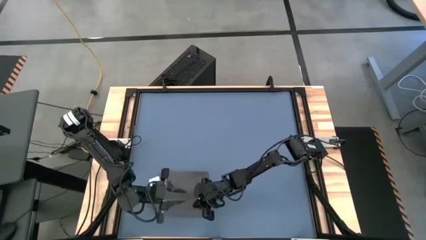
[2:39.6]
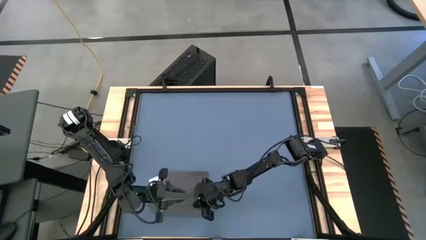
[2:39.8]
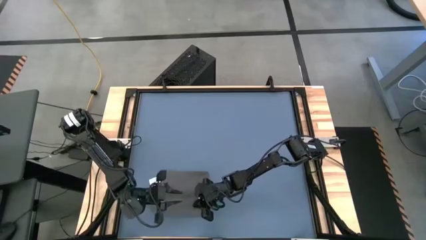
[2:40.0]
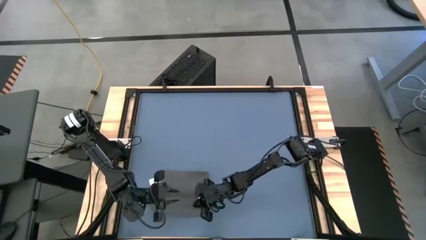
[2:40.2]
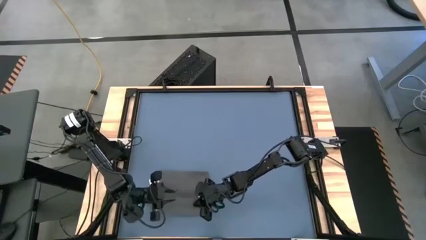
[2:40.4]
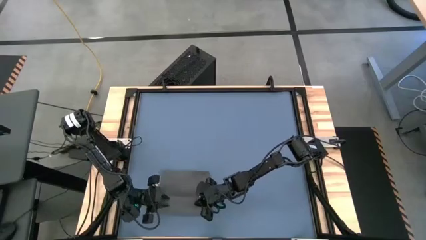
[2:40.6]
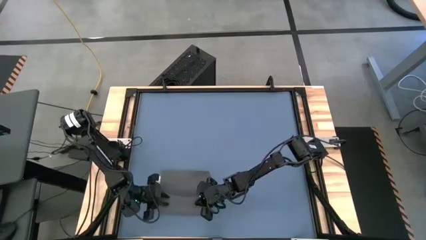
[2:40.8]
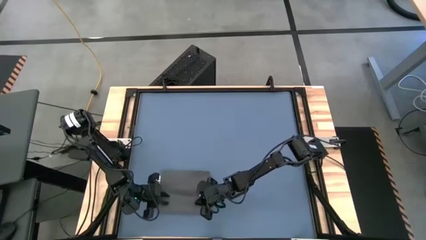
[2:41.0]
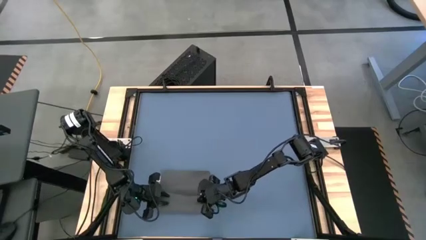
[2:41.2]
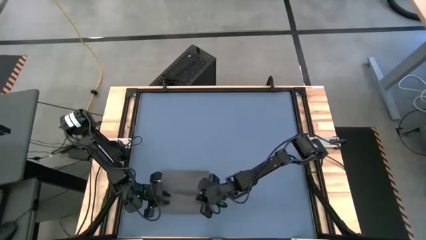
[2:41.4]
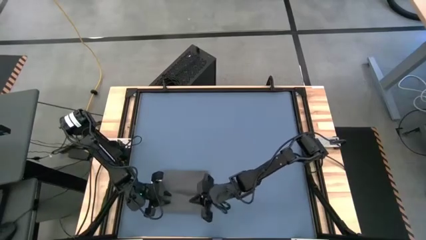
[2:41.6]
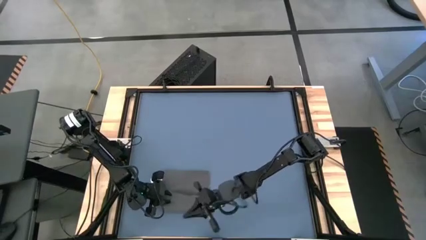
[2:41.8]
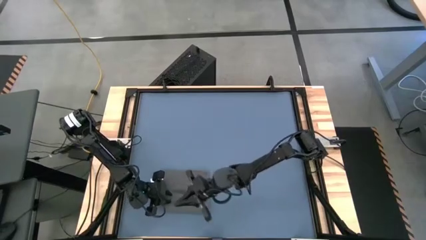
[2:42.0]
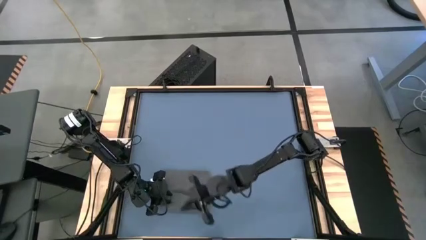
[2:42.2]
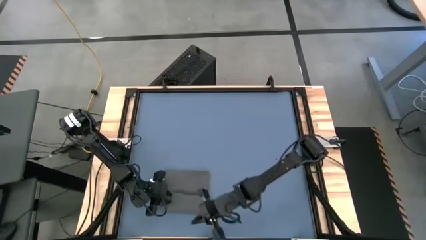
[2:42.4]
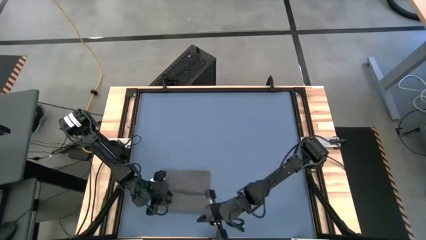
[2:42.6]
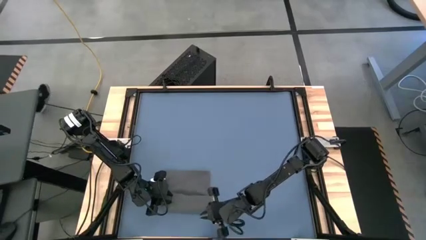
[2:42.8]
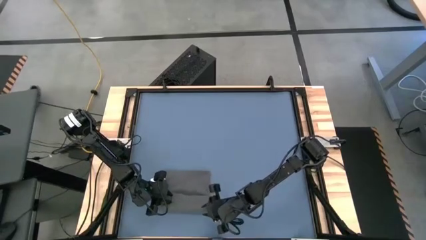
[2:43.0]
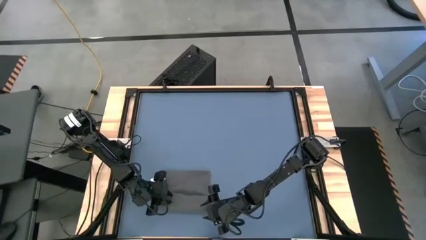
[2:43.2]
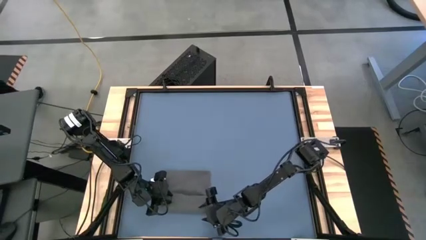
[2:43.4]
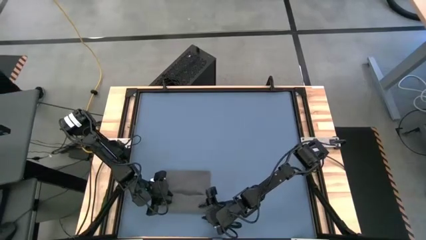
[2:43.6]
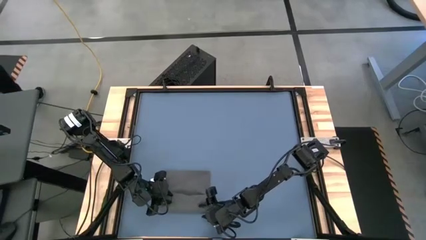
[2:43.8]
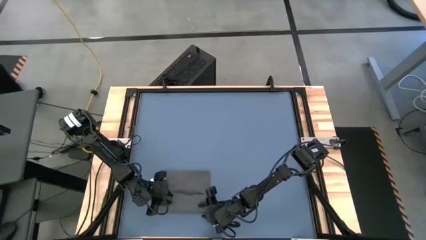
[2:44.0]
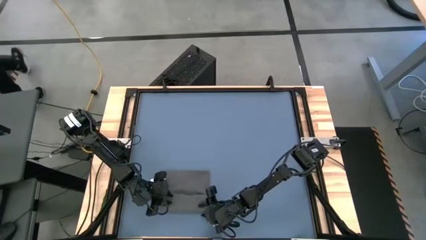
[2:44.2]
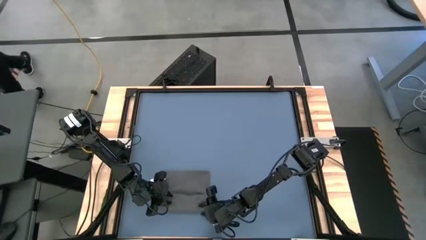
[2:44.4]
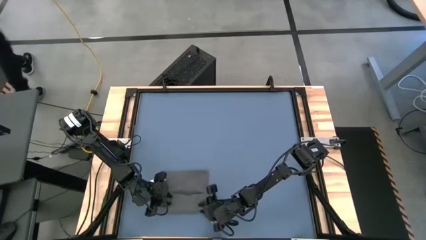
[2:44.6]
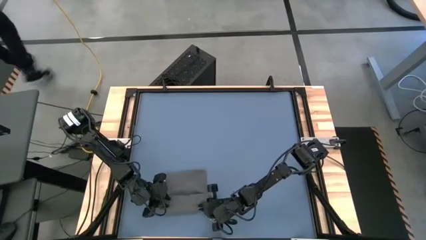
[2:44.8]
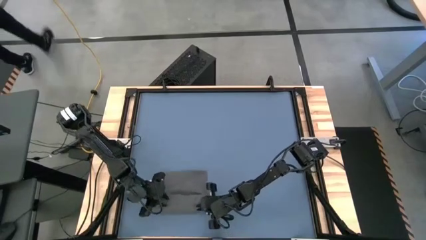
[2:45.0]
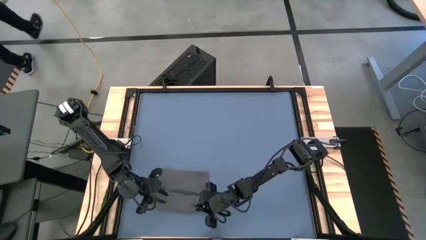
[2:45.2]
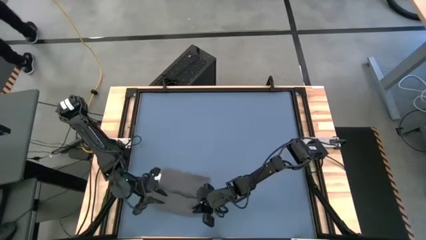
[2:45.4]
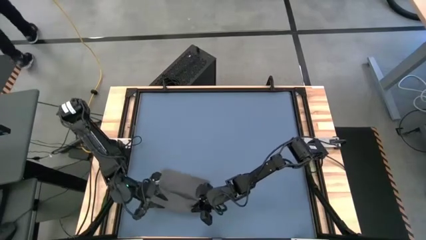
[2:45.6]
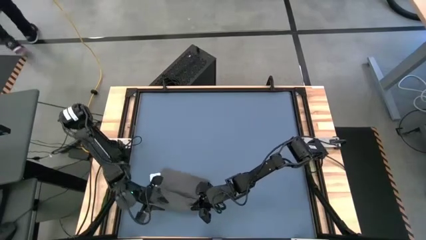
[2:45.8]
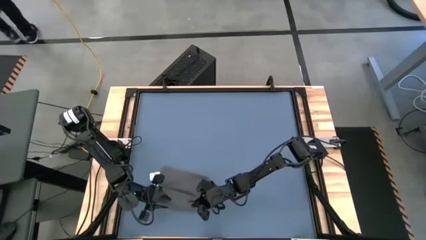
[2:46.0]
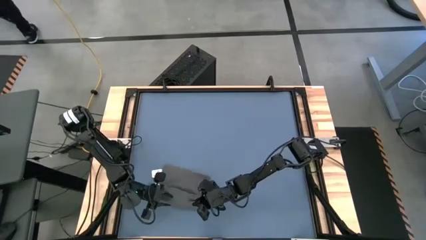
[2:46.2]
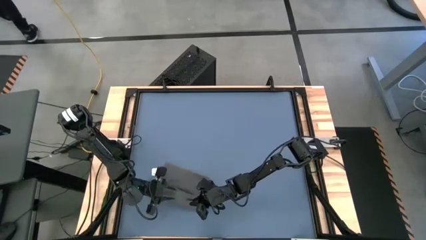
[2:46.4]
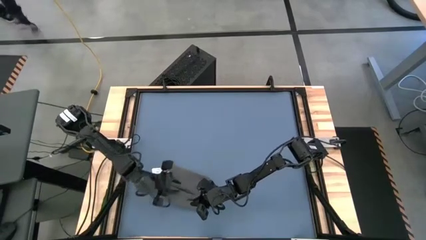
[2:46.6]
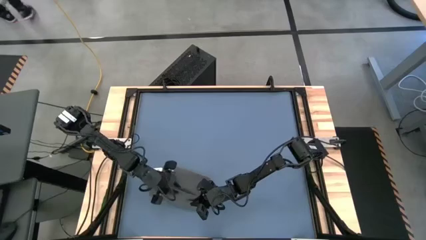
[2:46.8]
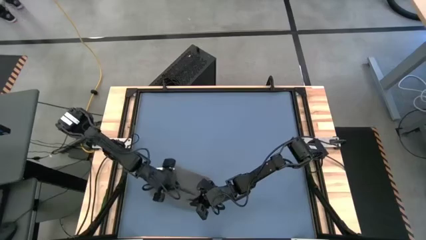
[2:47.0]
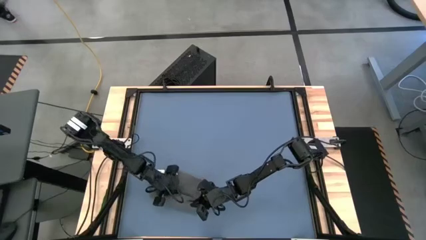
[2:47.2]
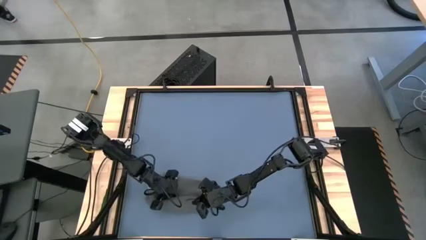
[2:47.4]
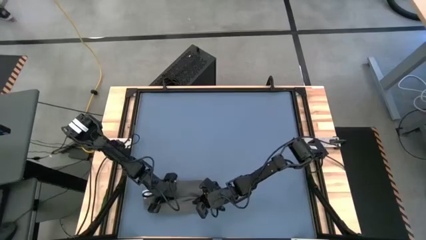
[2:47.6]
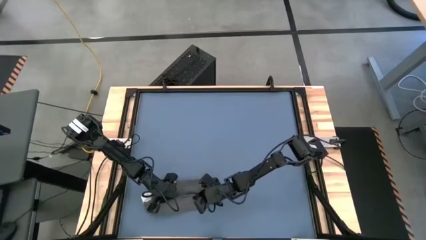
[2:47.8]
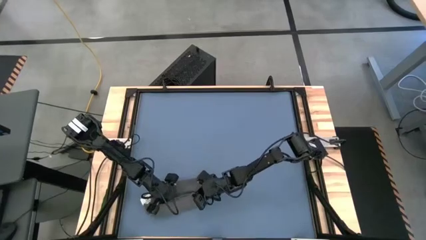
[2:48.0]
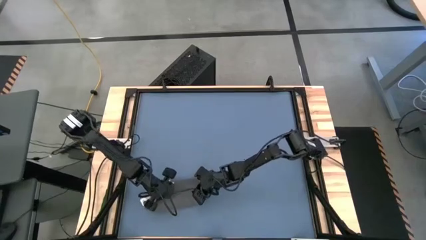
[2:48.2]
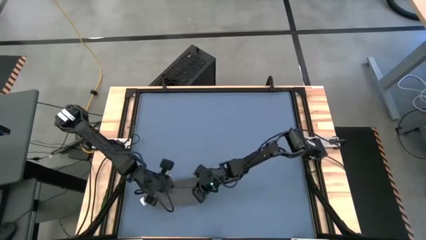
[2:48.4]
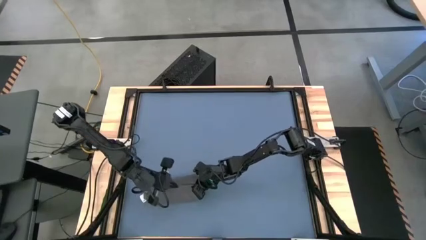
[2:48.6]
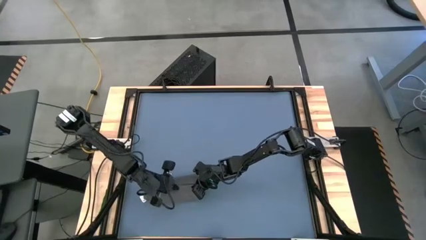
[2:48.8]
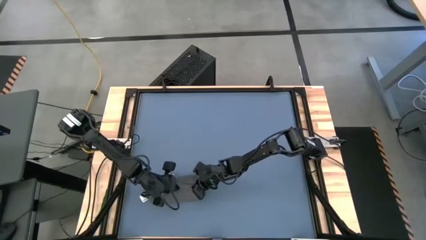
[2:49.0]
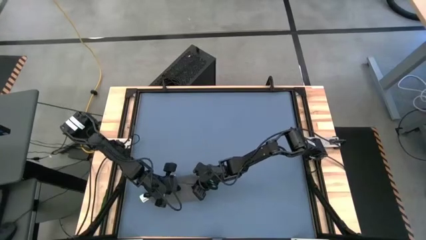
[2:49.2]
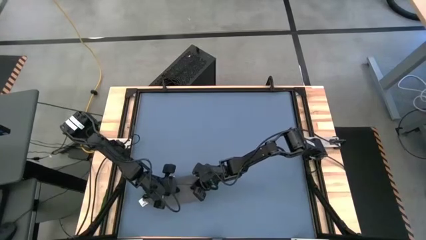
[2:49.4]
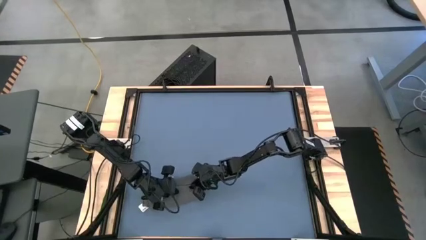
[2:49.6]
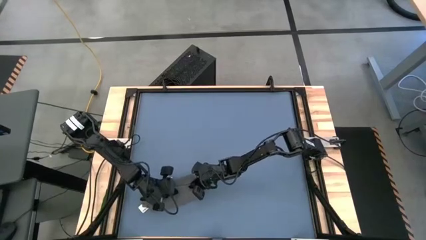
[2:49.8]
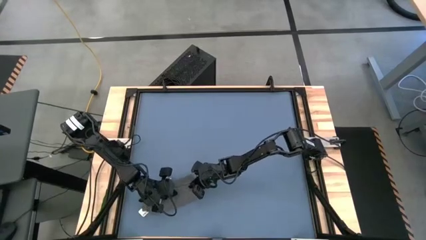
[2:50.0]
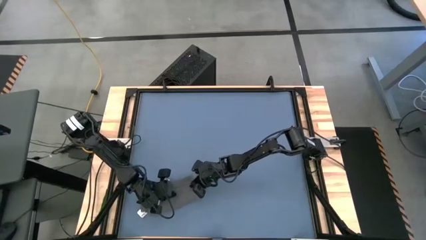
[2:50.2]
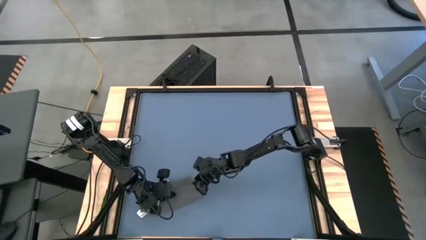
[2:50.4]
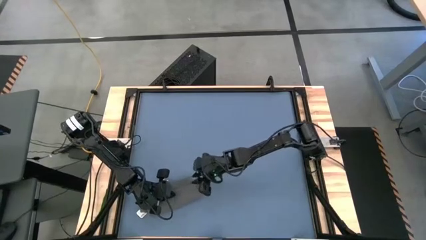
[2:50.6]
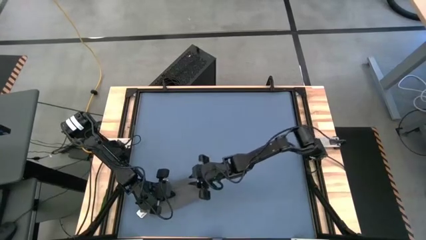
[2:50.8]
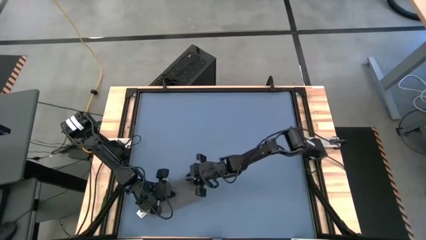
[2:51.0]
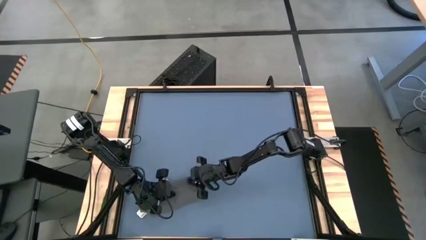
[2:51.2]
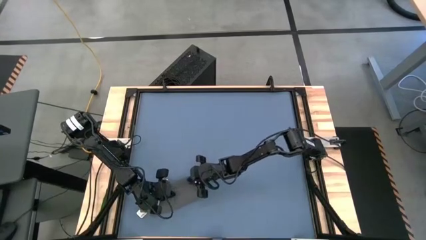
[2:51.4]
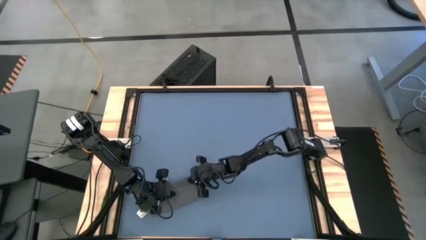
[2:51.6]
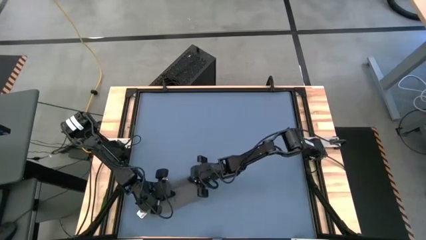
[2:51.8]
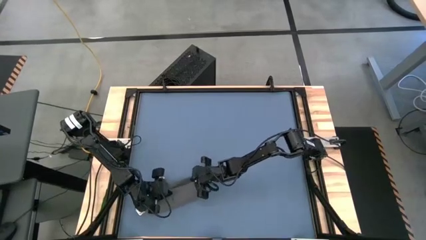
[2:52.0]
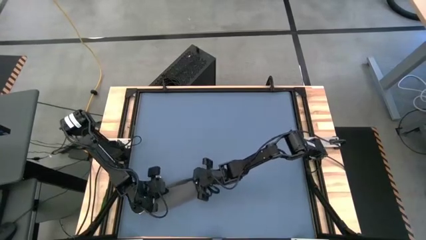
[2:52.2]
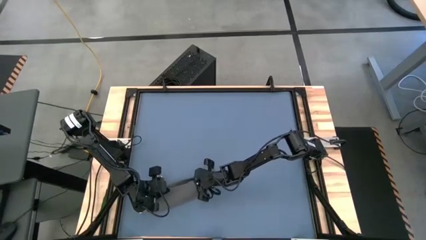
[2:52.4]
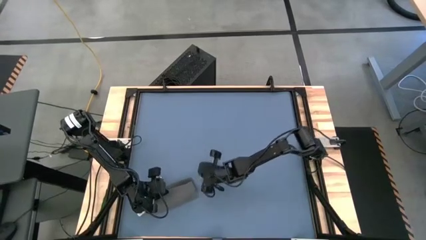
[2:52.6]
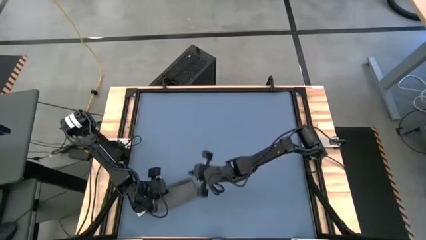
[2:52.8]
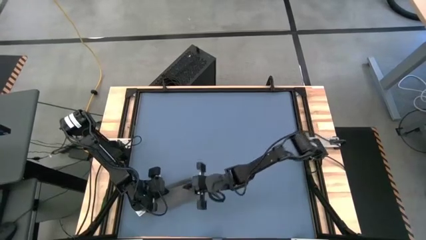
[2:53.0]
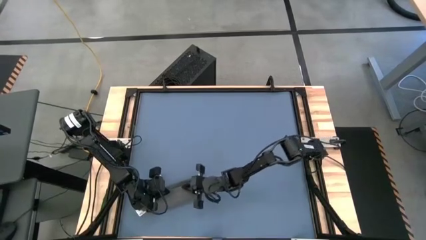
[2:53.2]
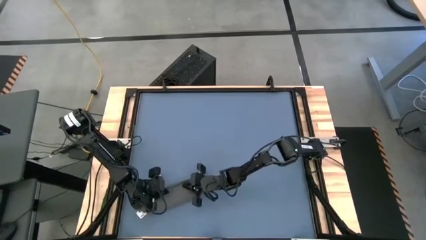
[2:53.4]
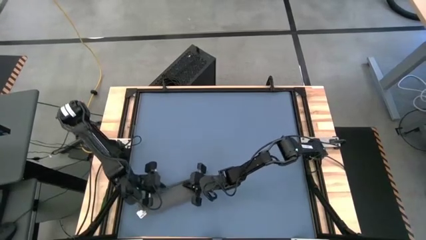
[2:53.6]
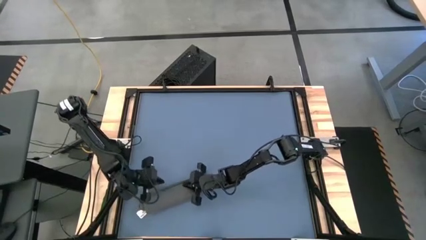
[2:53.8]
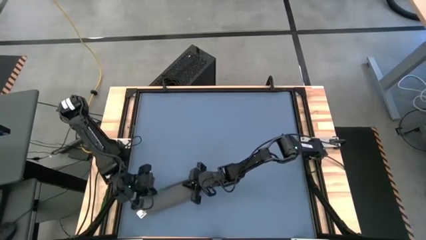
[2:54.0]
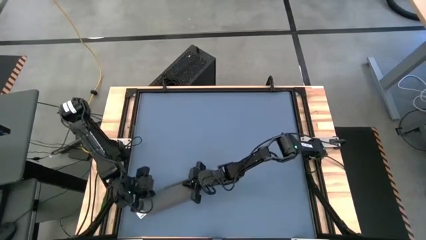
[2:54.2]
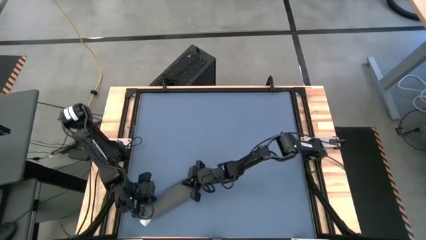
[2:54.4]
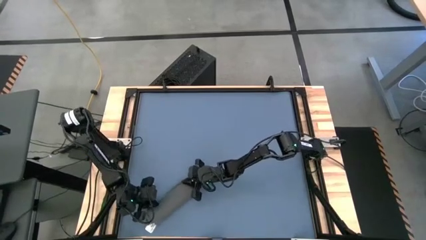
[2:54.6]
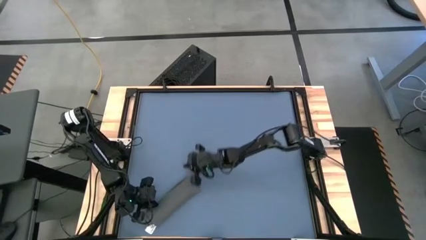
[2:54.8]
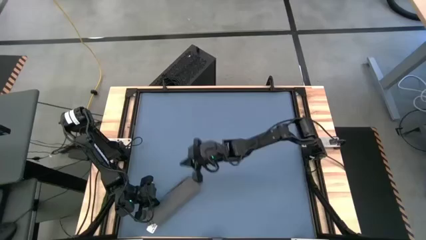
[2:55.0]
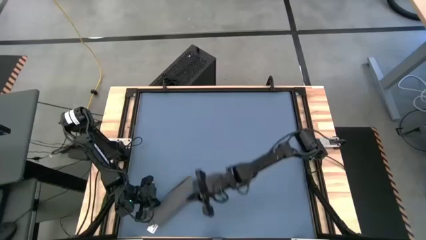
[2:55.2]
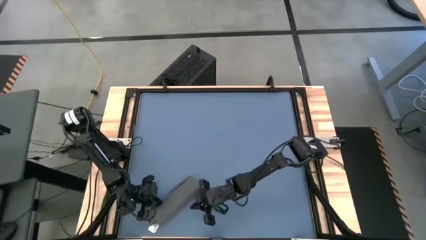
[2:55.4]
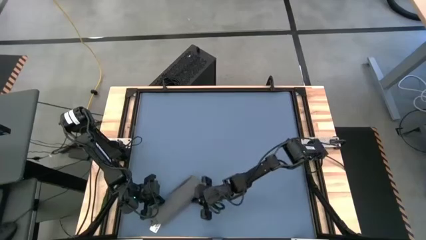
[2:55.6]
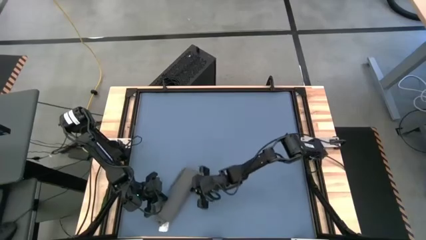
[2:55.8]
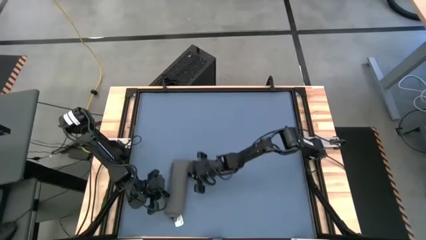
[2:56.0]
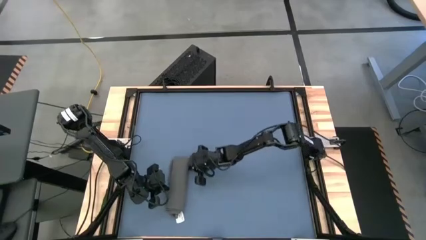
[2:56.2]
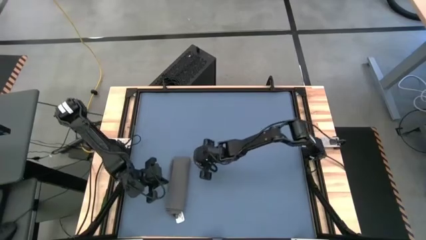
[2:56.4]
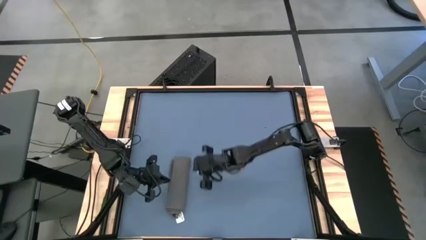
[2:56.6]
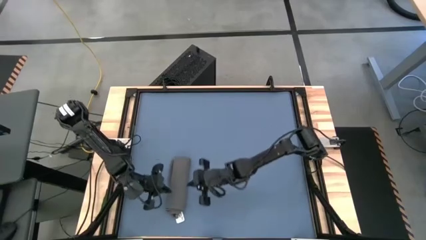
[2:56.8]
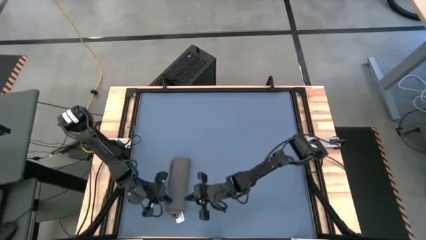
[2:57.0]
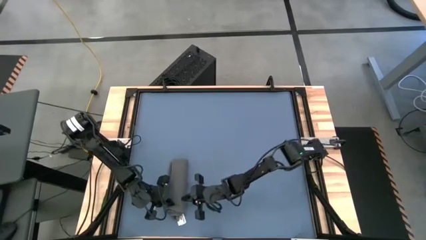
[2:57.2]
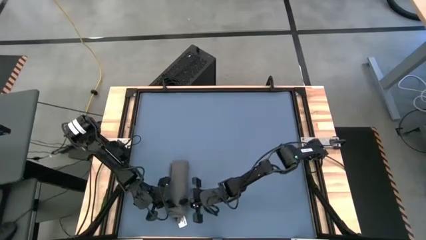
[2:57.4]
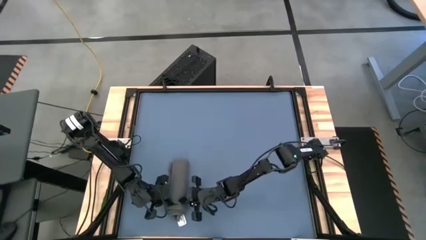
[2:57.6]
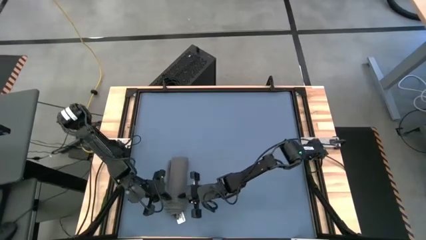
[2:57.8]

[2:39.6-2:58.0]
Task: Roll towel into tight, uniform cylinder
Roll the gray towel
